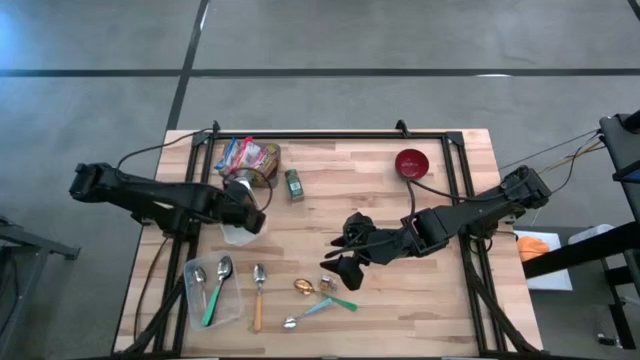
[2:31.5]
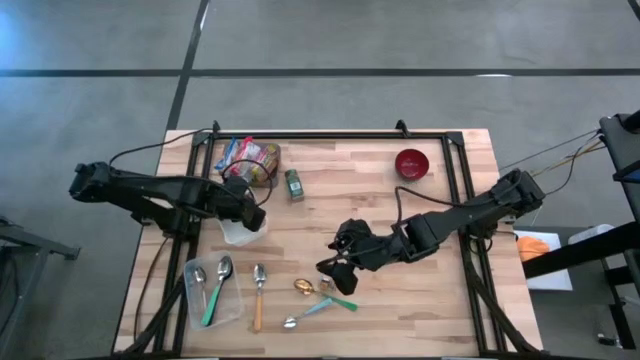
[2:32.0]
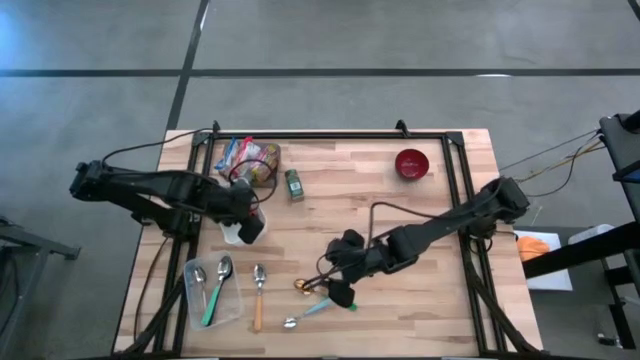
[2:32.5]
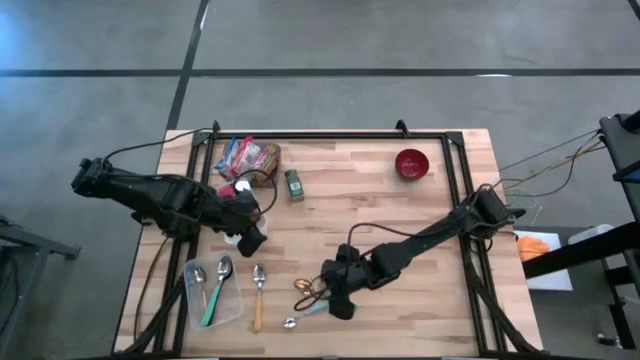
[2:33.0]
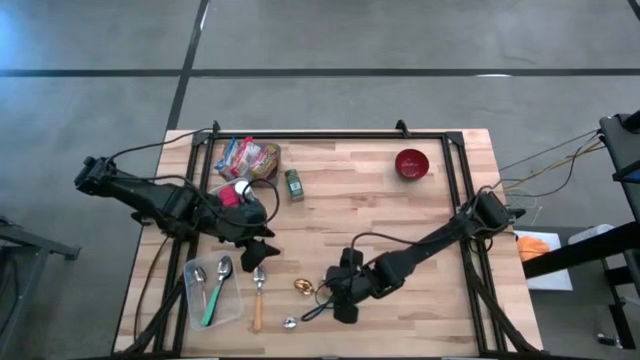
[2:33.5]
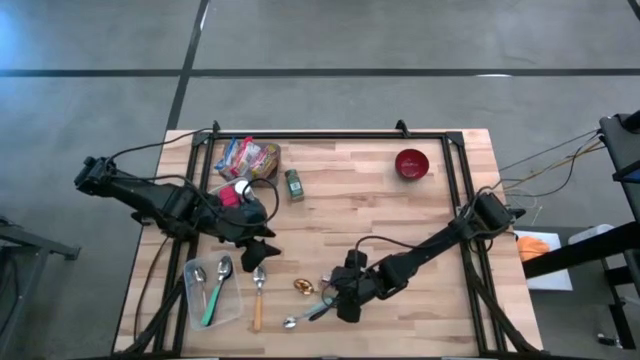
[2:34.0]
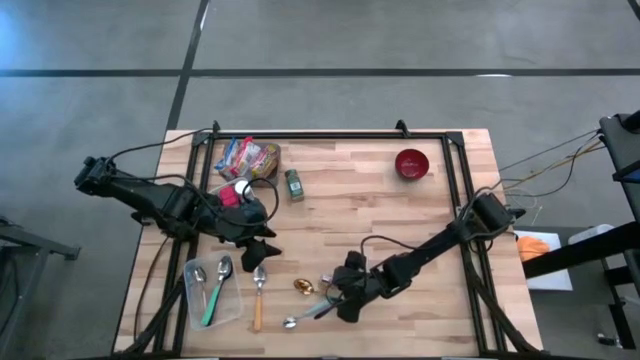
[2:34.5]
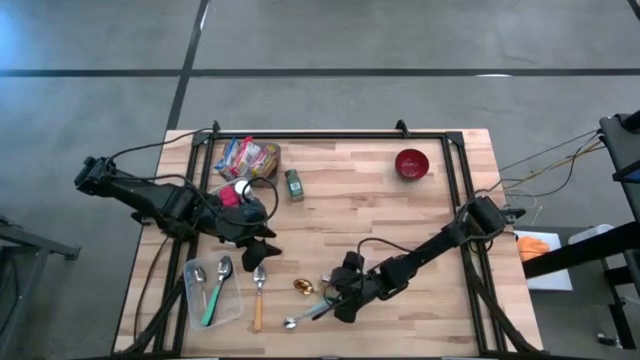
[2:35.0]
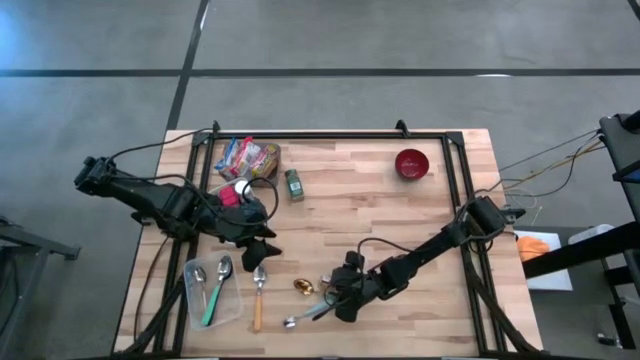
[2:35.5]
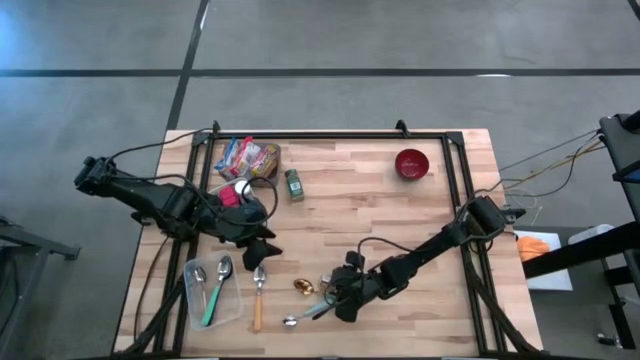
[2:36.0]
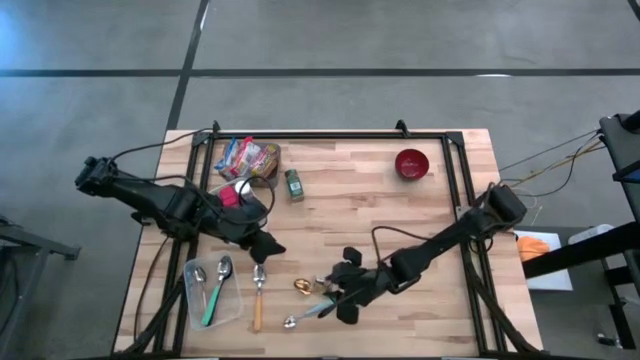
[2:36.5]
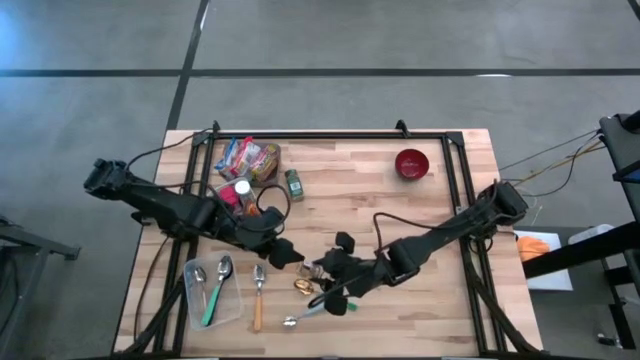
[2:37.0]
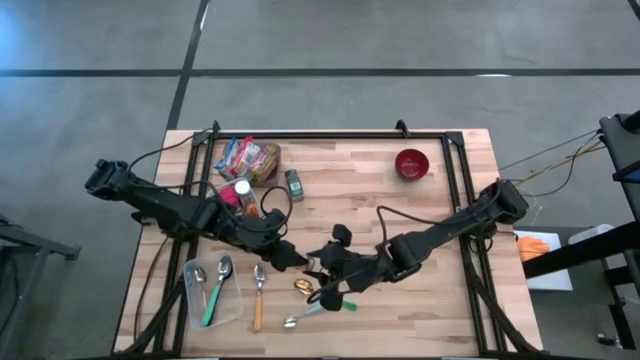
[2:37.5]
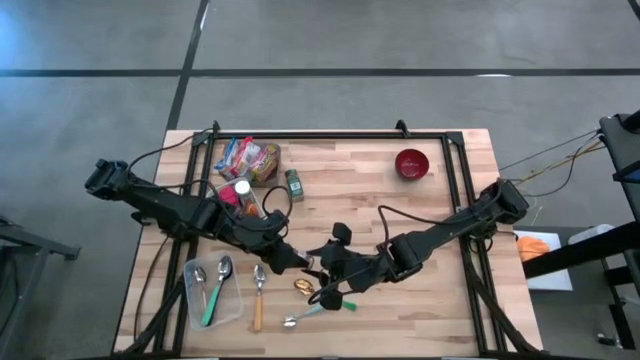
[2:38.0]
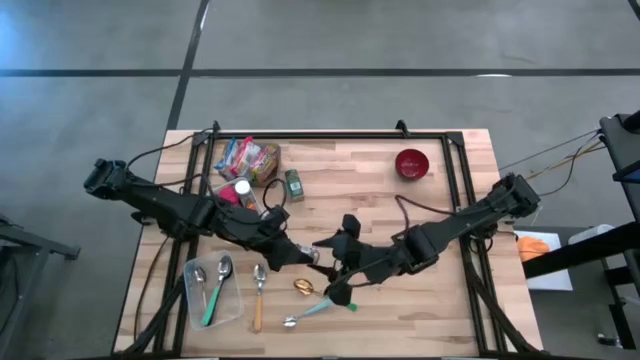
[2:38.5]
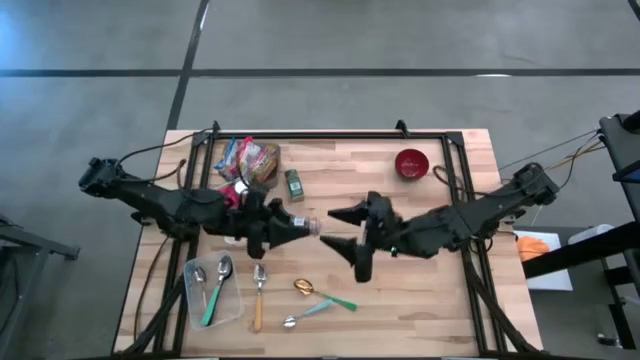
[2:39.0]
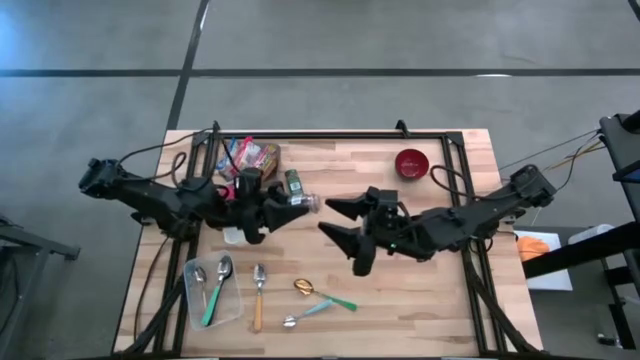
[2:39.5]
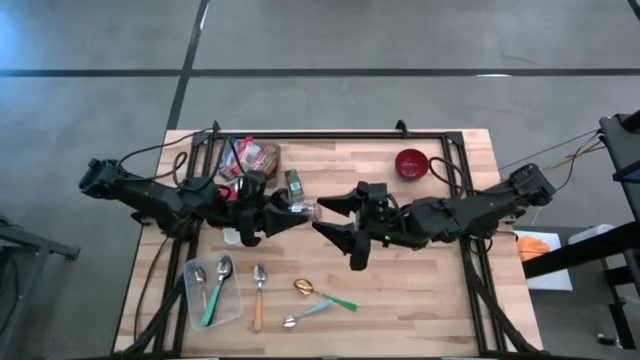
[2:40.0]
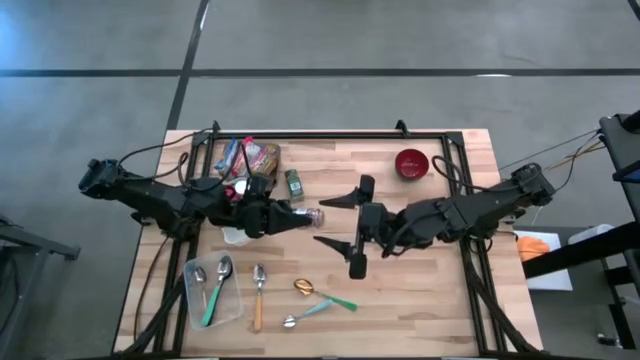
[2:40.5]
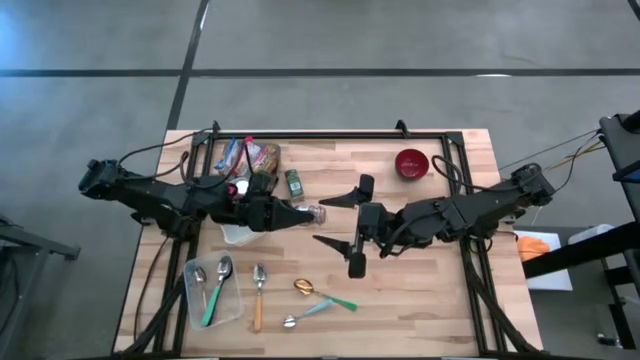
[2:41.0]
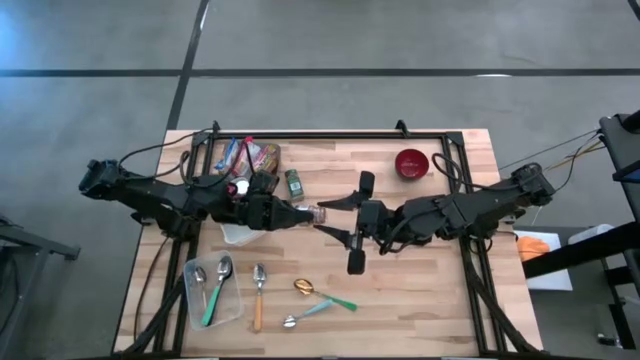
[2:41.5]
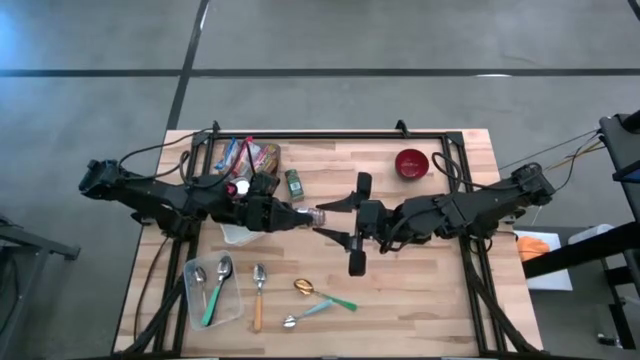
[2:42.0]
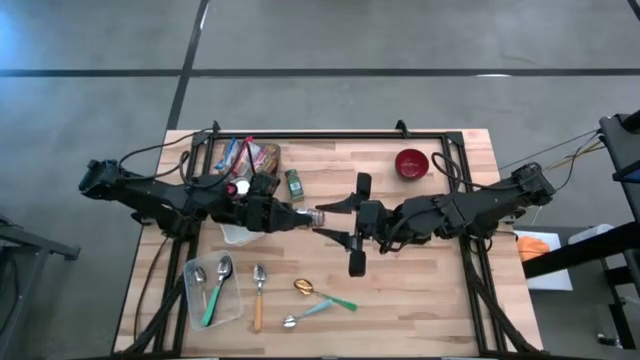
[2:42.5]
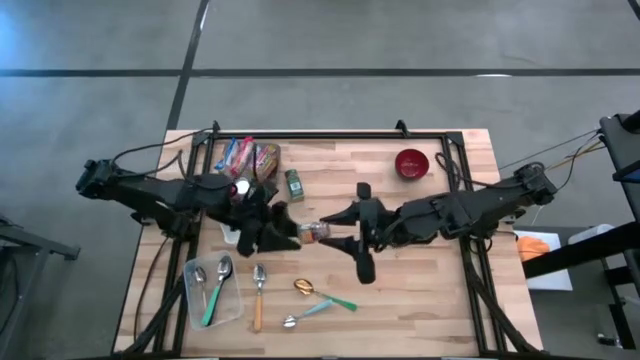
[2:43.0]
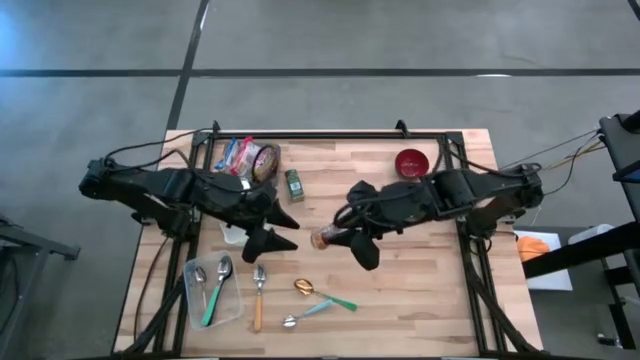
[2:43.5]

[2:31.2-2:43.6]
Put the brown seasoning bottle into the white bin

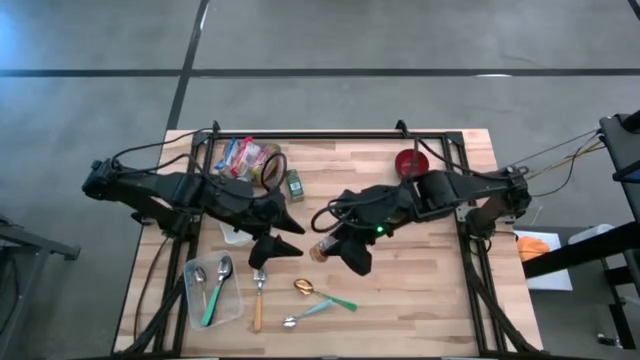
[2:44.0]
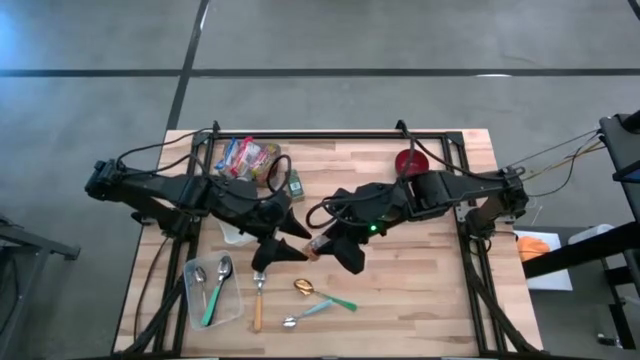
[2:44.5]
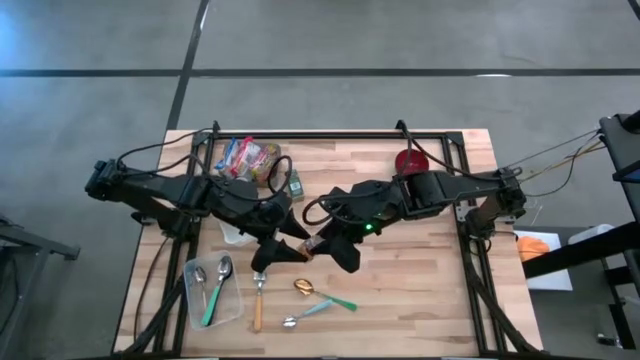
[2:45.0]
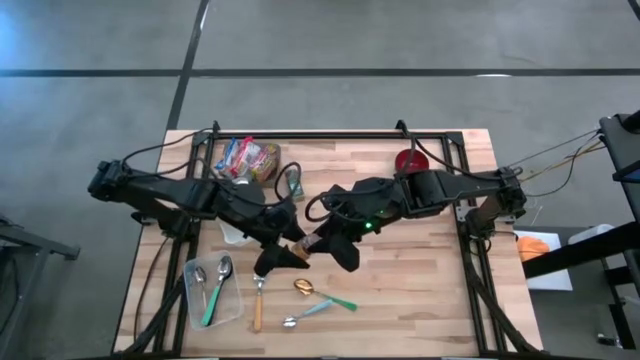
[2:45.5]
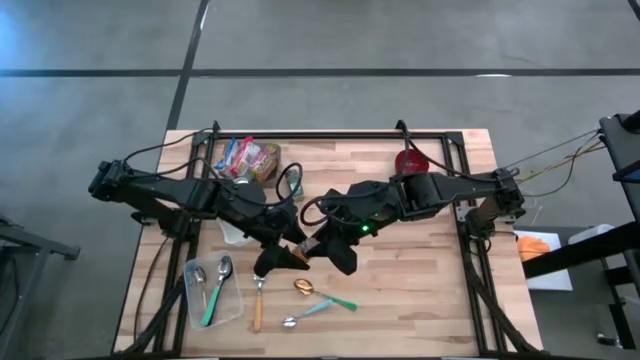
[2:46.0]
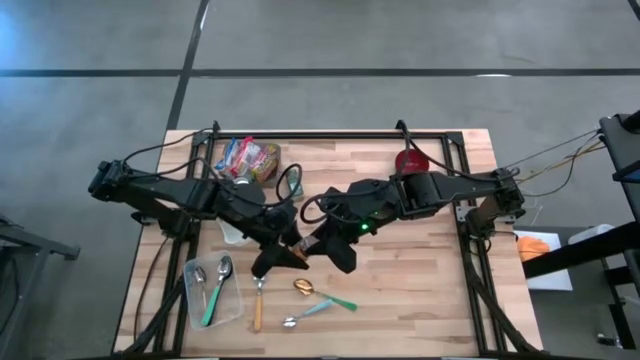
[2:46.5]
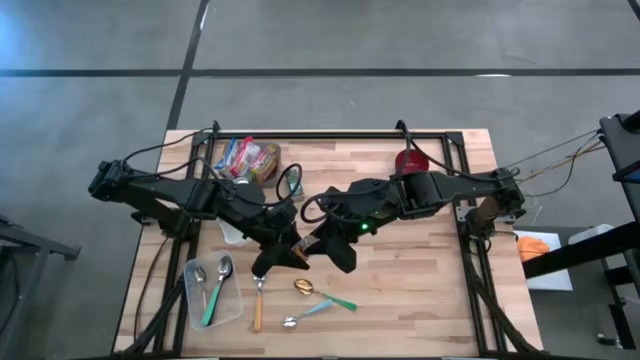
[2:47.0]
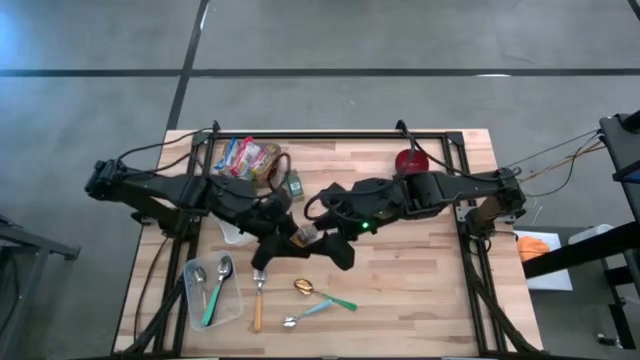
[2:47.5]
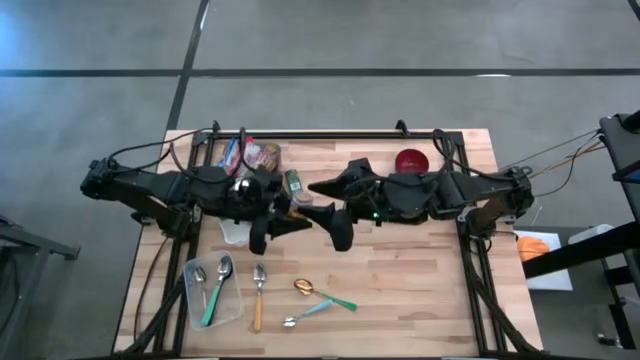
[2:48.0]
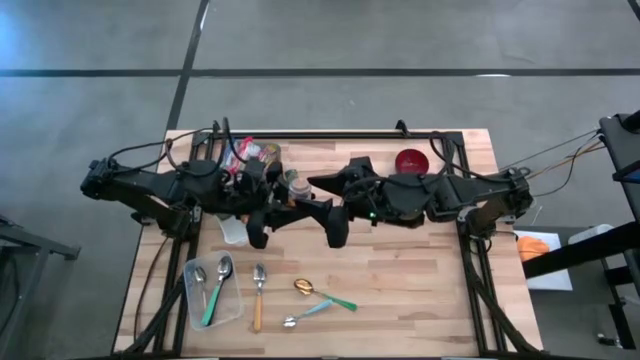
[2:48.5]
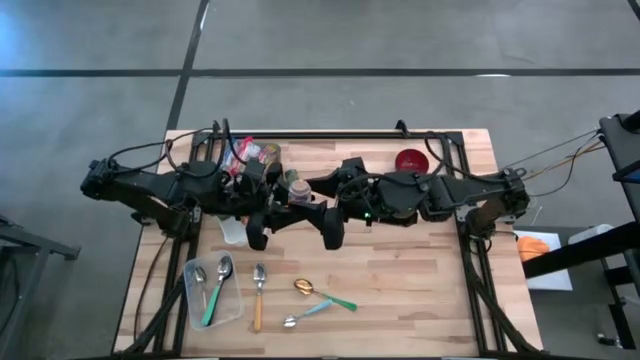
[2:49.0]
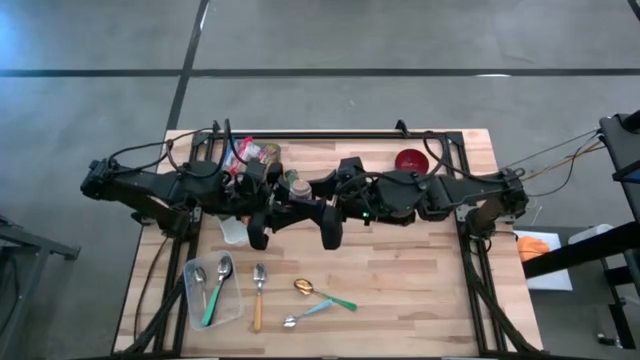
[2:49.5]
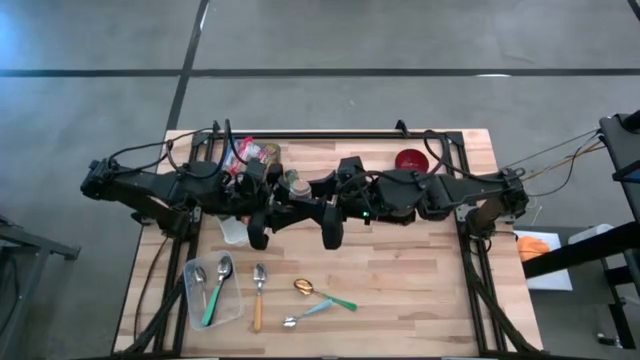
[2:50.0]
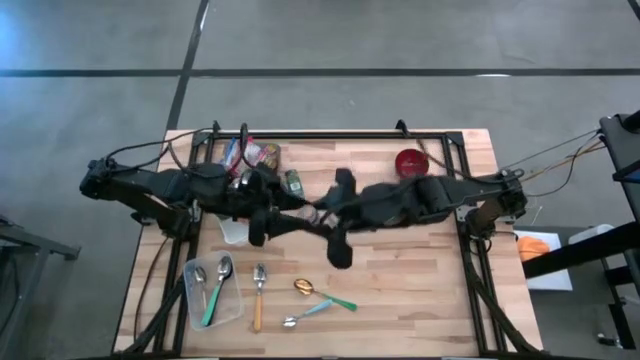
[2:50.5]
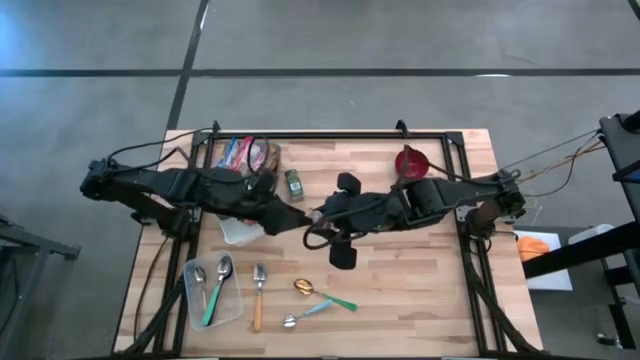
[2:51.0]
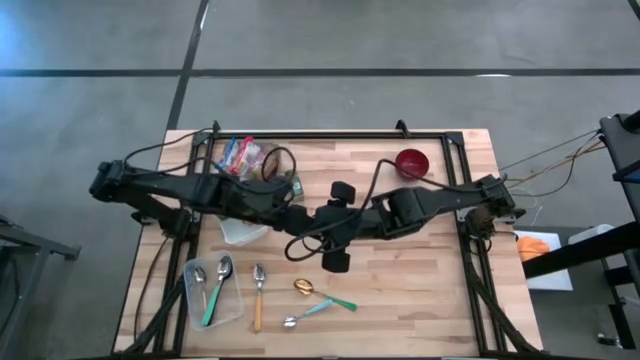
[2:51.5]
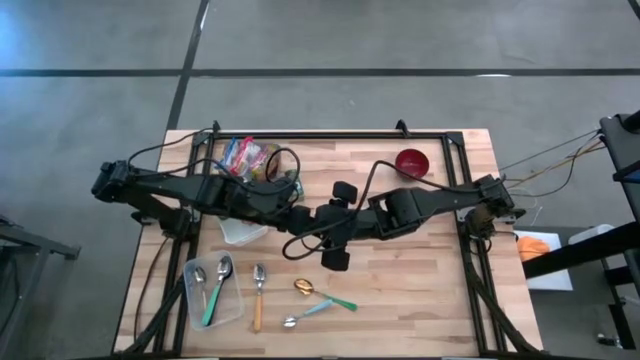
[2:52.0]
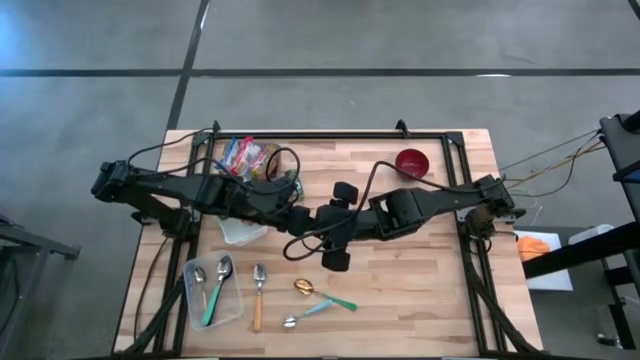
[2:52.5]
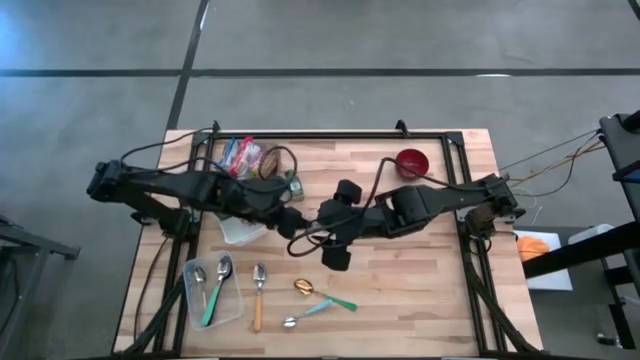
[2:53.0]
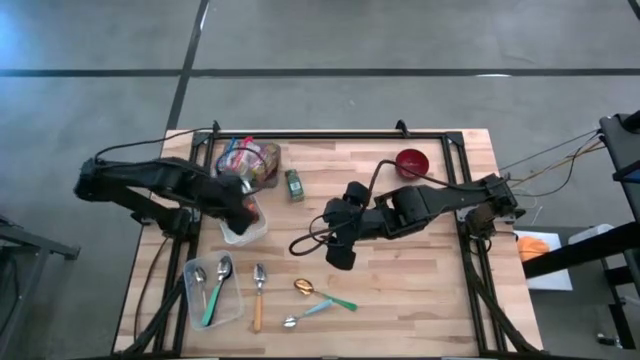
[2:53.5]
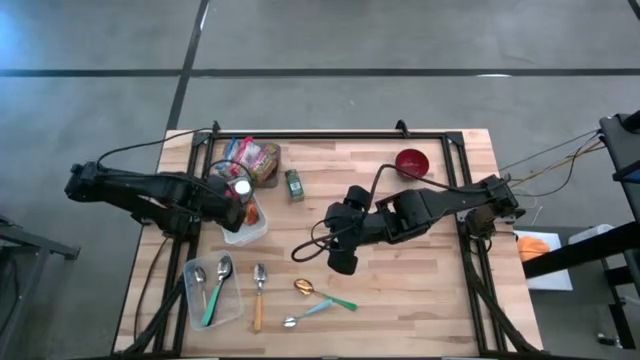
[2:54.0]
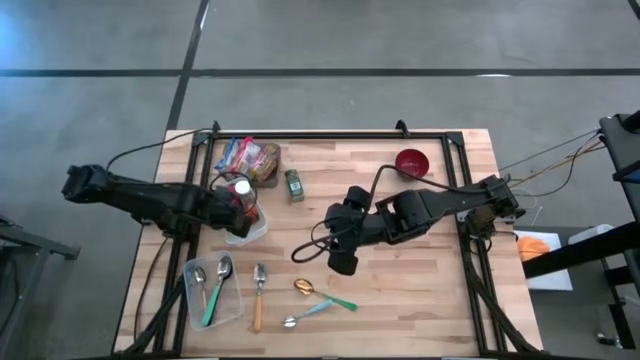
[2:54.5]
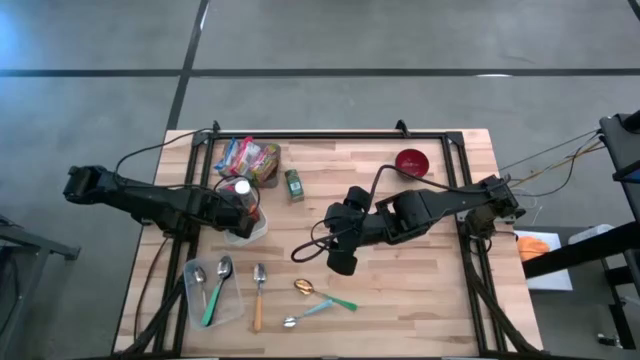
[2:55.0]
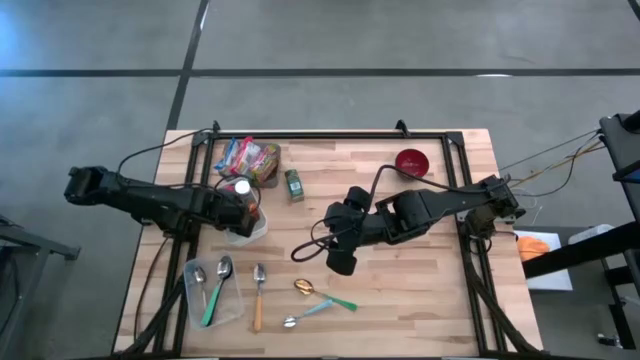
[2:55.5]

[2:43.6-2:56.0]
Put the brown seasoning bottle into the white bin
